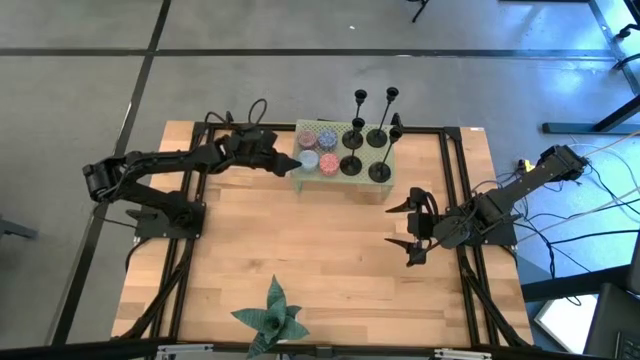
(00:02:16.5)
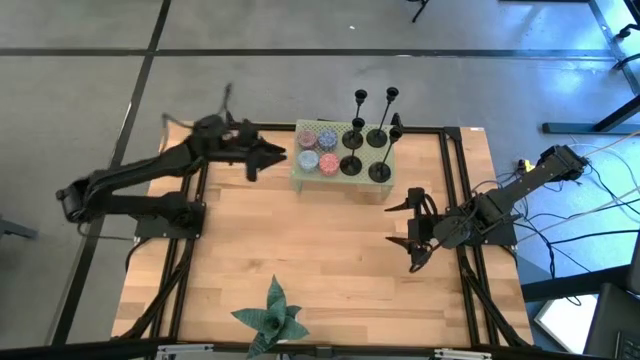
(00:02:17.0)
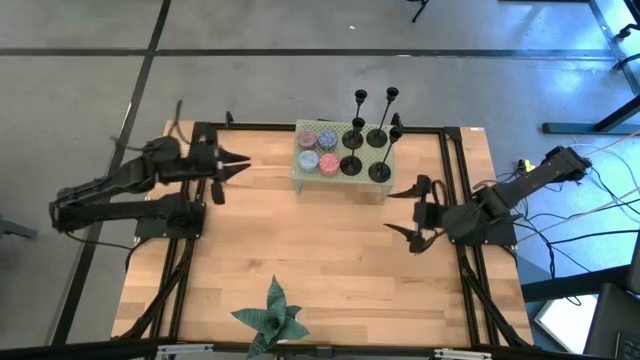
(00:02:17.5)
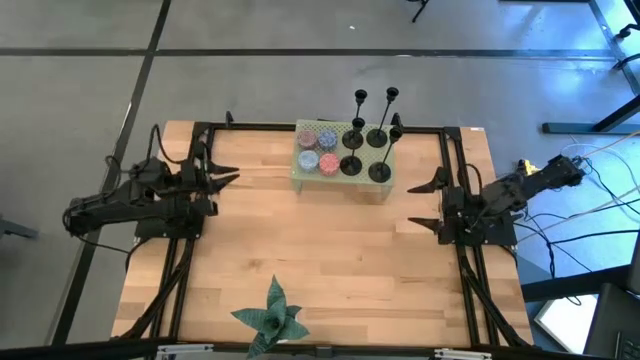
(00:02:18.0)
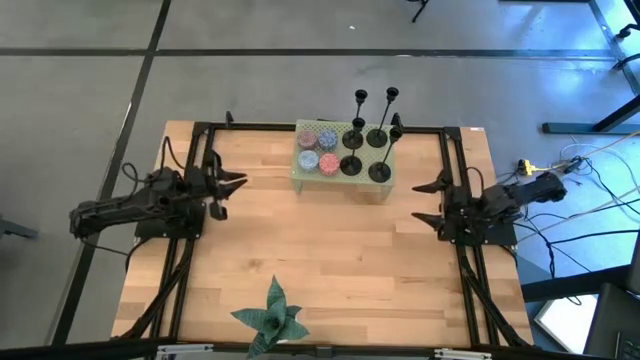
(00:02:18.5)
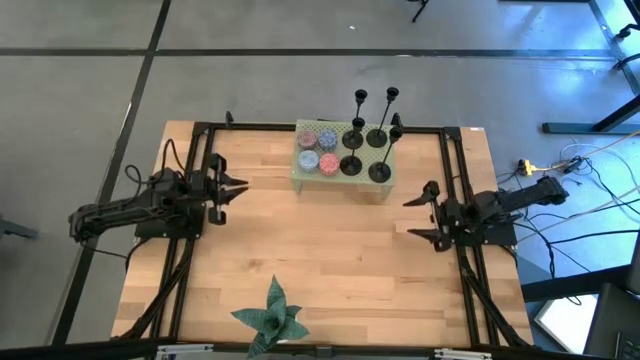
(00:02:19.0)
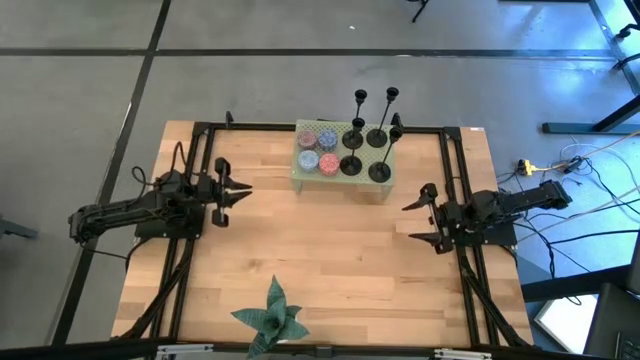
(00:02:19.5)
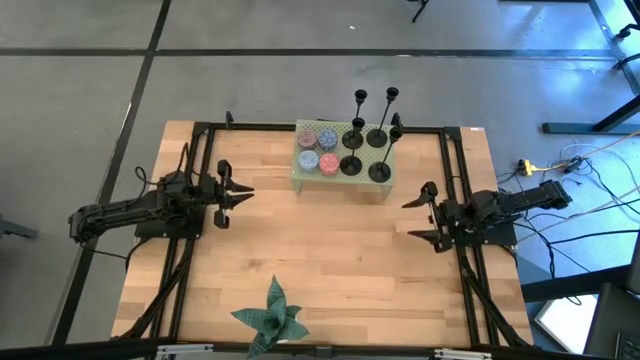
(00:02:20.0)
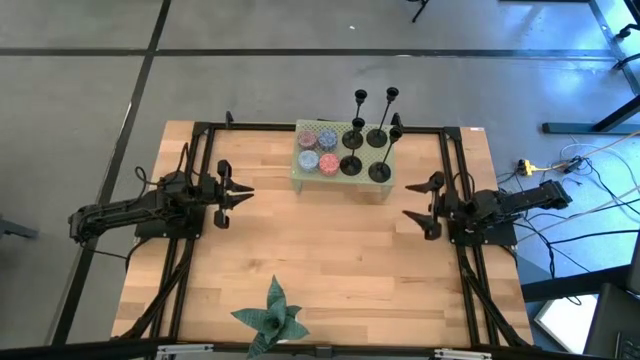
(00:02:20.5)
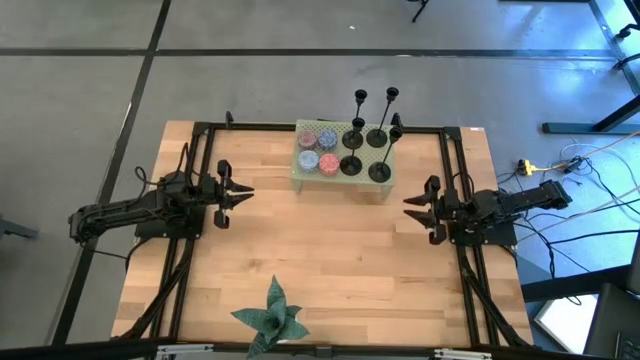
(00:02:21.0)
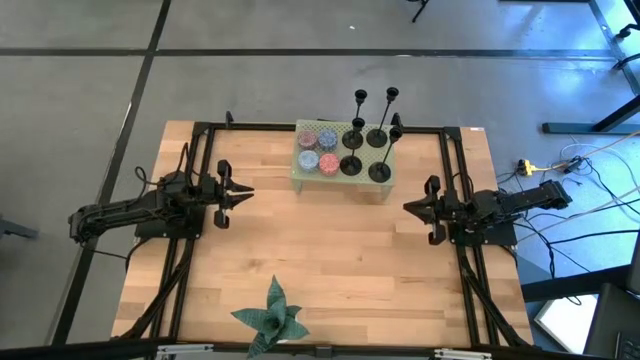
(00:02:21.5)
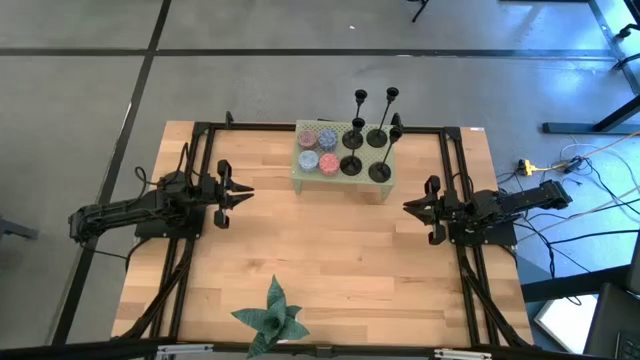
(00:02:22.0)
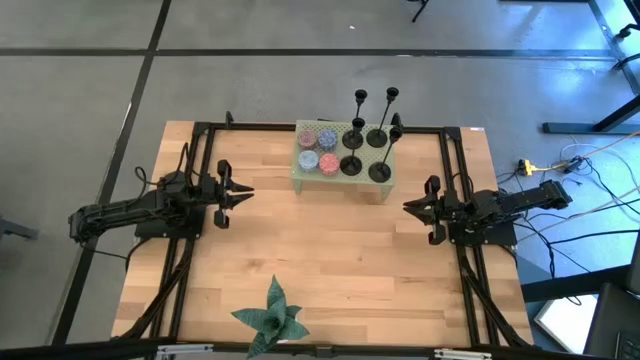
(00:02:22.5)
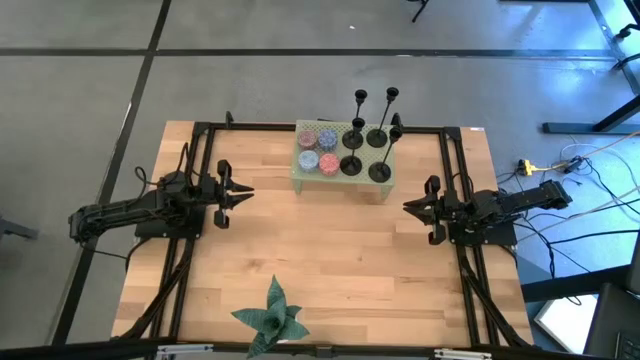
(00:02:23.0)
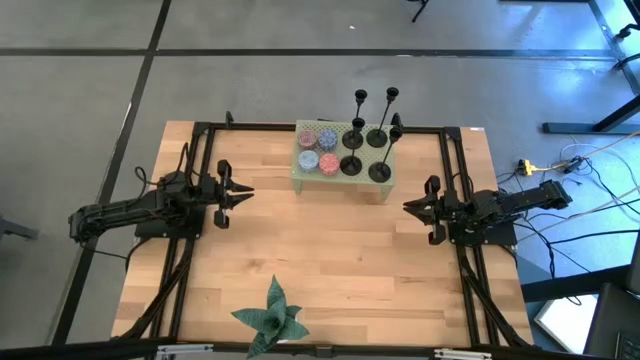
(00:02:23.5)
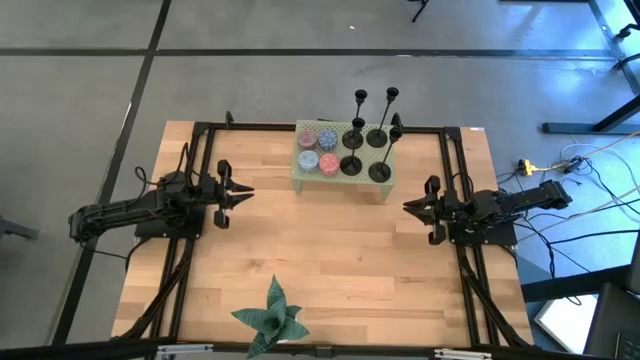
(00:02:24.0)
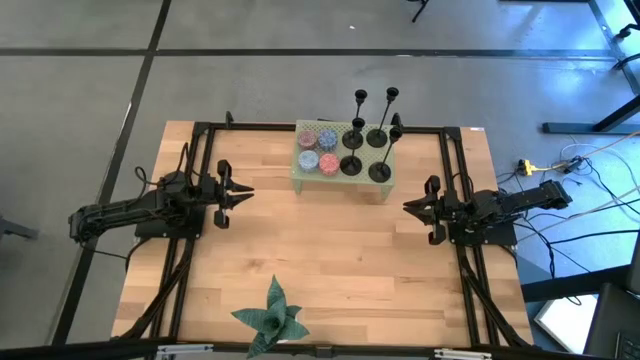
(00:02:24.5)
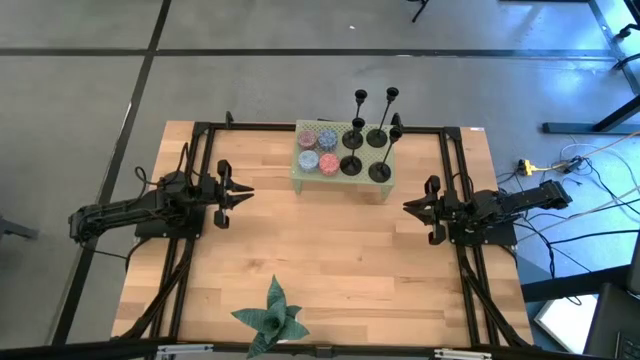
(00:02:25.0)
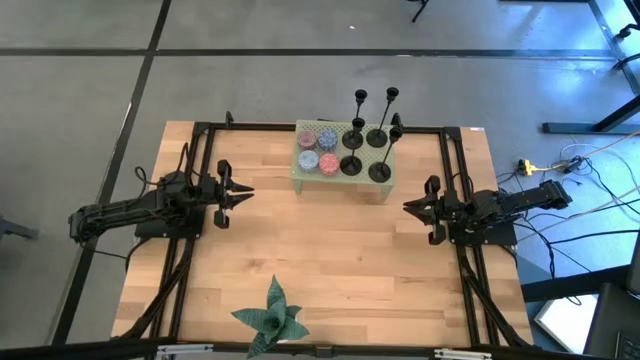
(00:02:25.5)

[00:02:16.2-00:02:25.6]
Task: Pick & Place candle stick holders
Return to Home Position

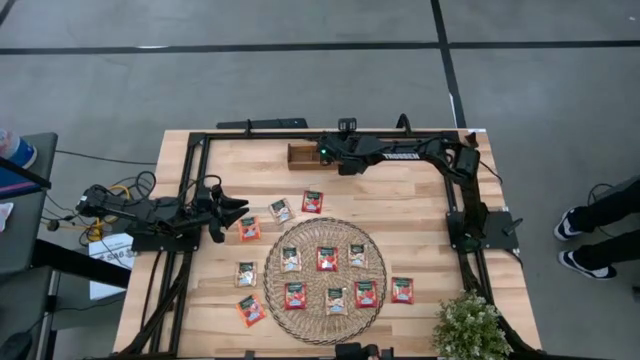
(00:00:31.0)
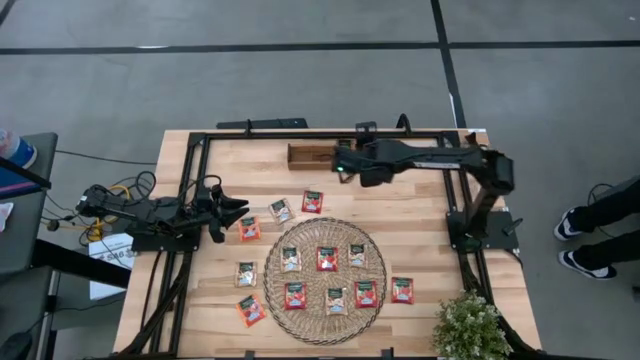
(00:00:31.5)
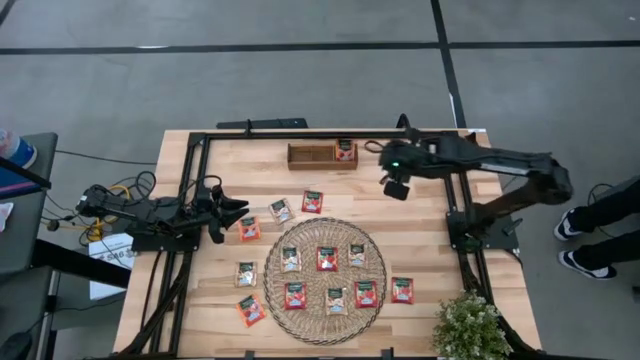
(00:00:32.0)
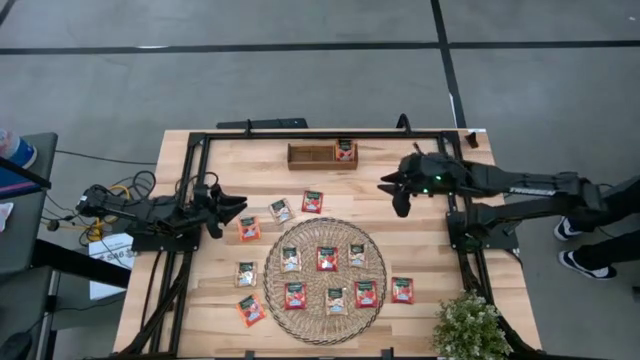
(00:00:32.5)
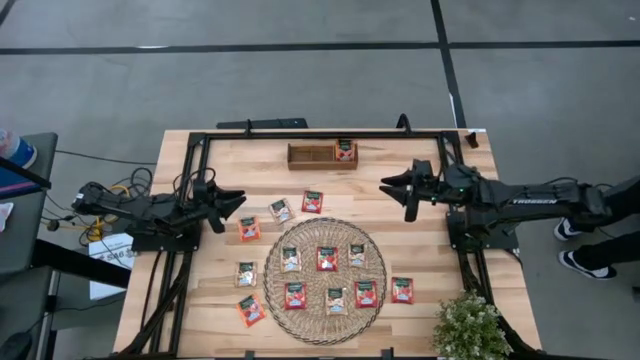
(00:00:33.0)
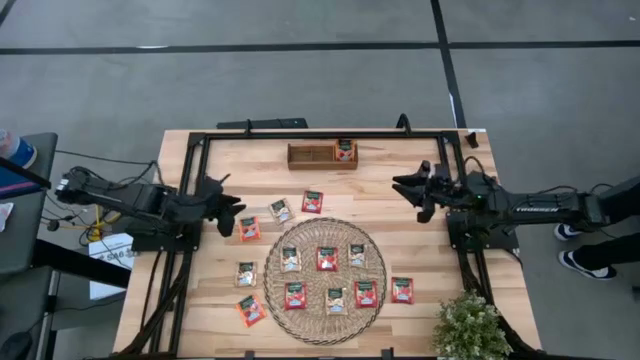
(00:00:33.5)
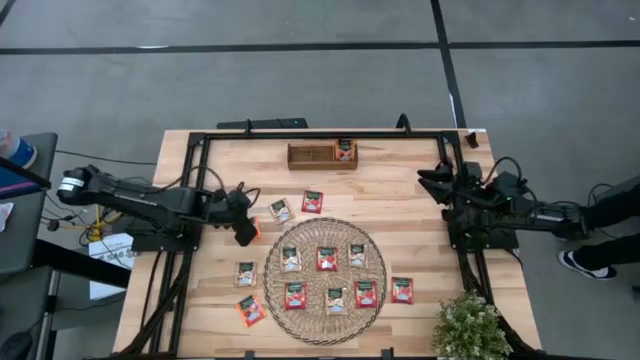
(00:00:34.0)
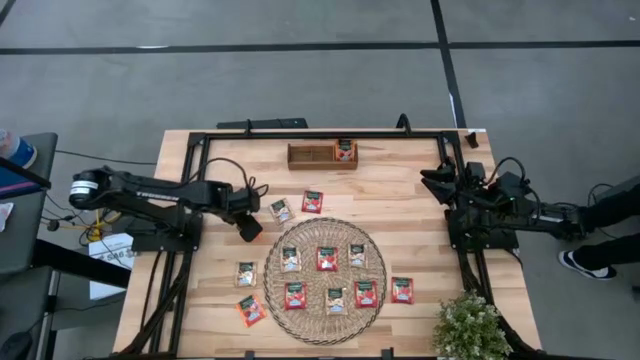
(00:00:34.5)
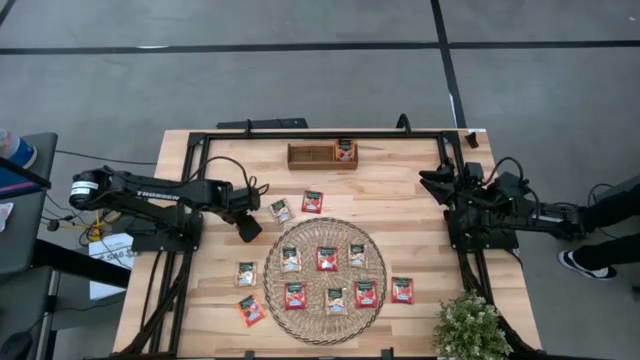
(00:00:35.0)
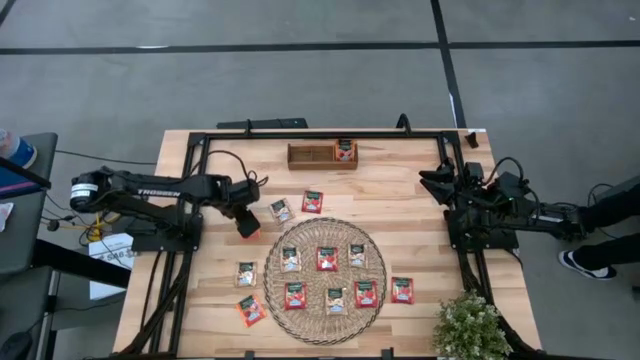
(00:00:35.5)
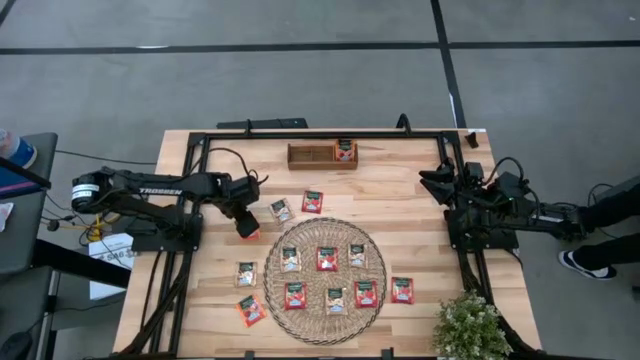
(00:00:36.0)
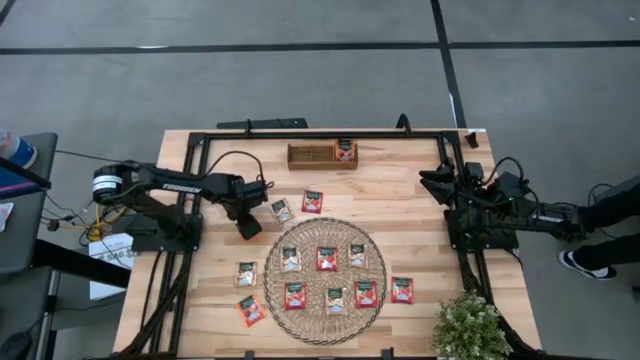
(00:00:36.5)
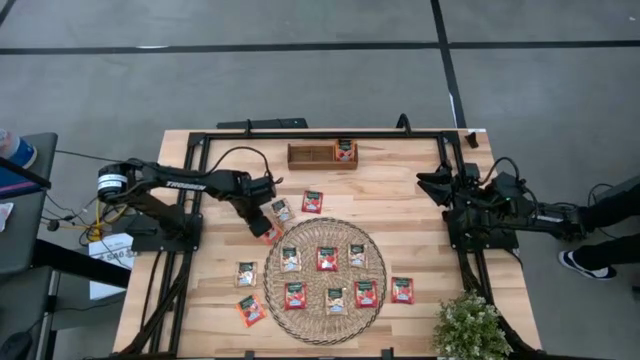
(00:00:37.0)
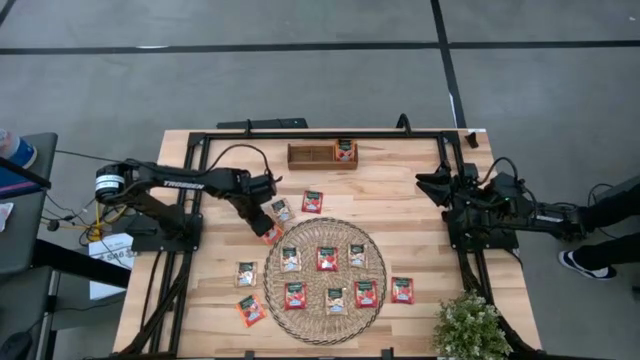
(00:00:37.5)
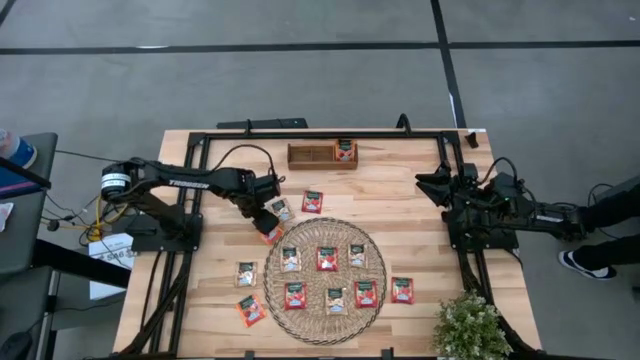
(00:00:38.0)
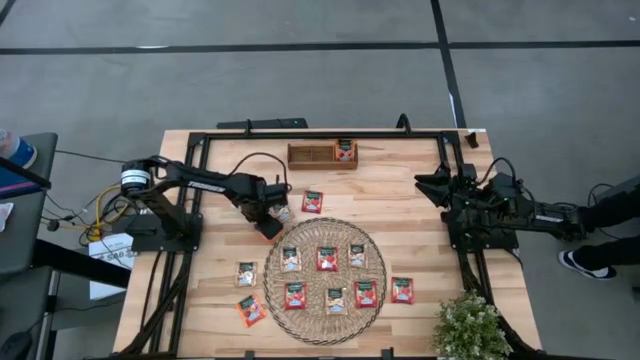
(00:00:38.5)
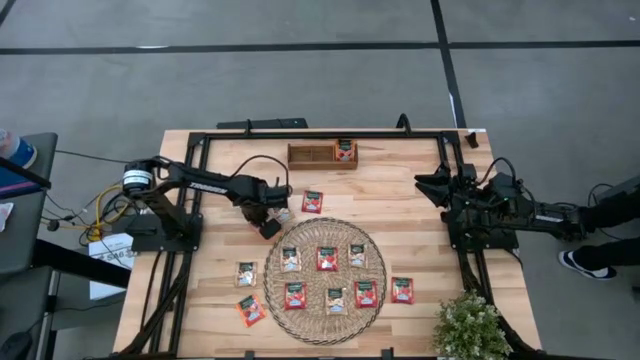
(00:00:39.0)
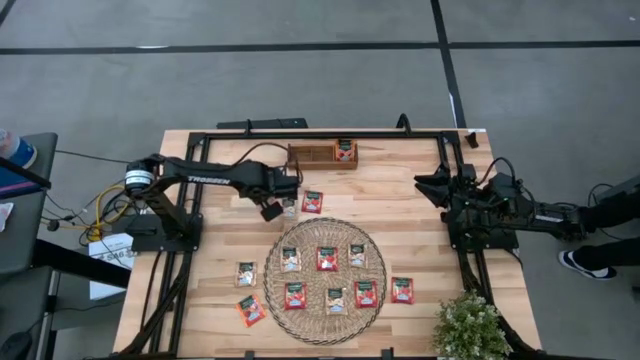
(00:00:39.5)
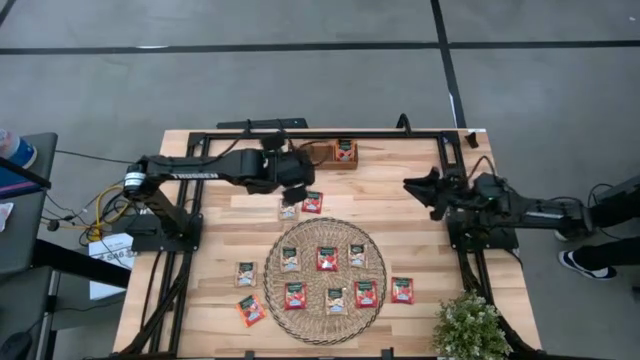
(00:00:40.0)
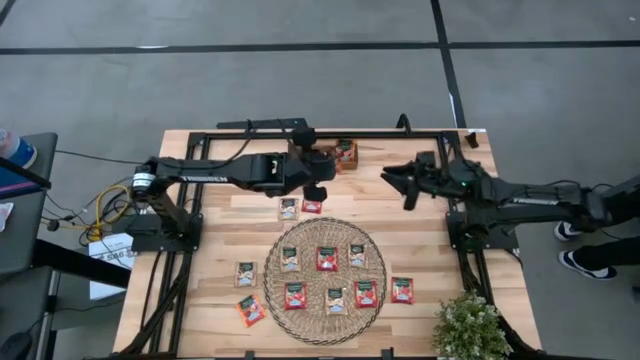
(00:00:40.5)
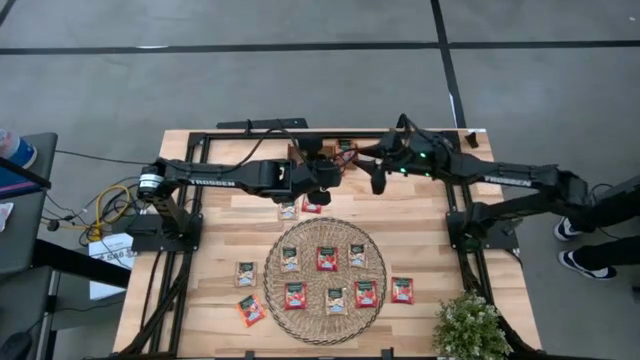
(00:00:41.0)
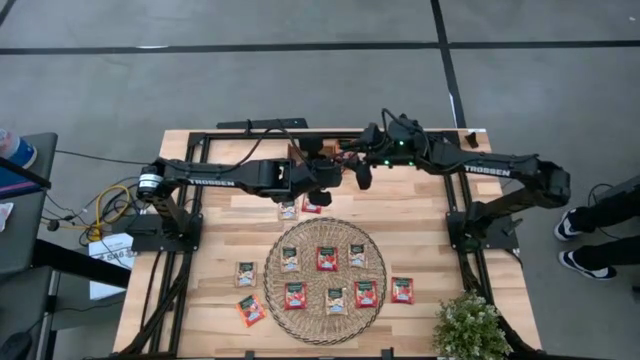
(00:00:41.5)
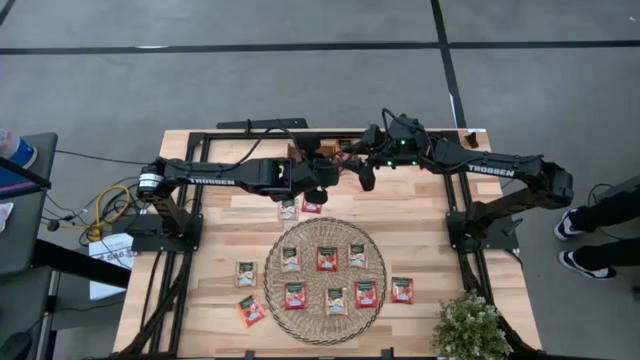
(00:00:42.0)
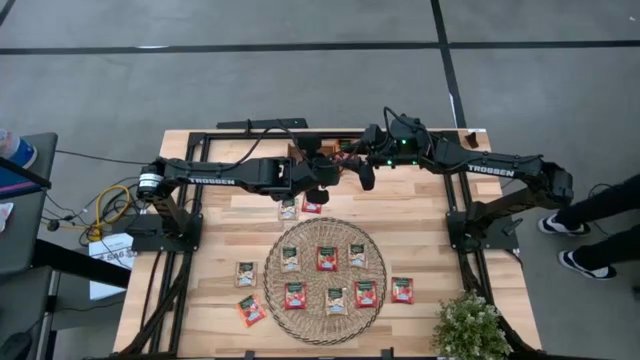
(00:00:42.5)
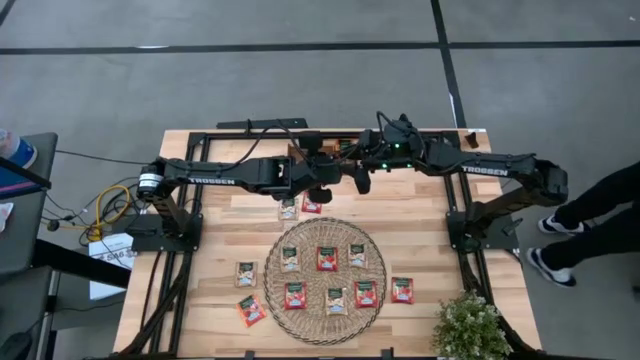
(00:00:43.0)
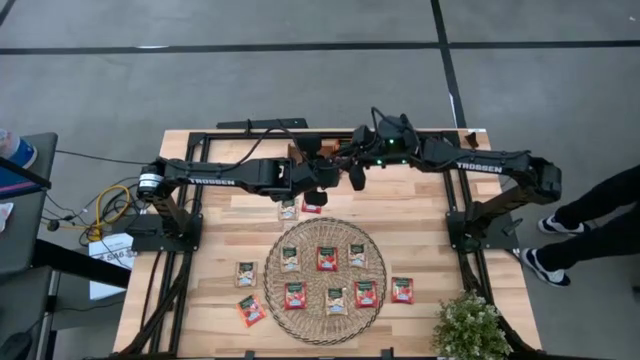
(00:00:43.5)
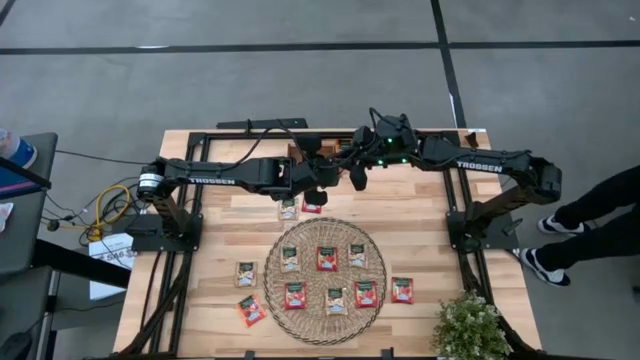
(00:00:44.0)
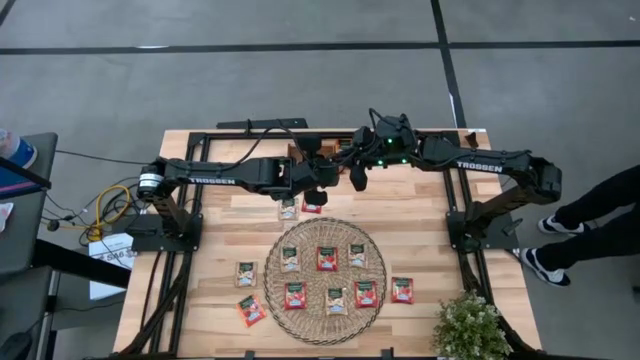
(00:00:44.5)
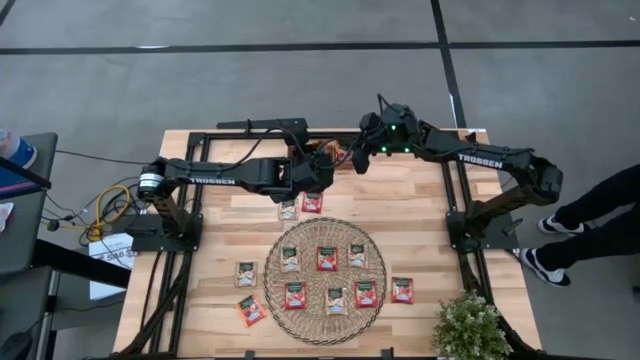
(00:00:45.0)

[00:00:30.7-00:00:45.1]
Task: Pick & Place Tea
Put the orange tea bag into the right section of the wooden organizer
